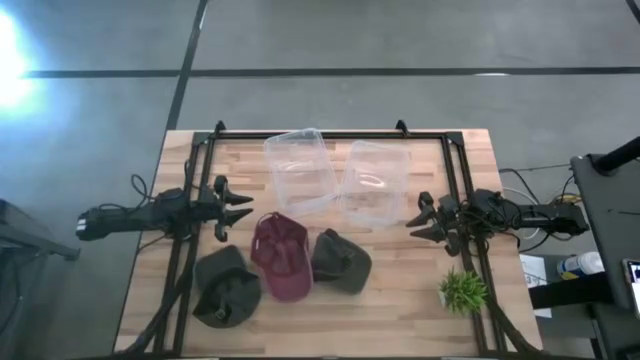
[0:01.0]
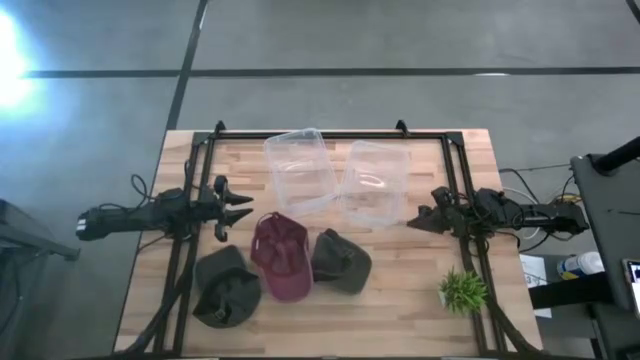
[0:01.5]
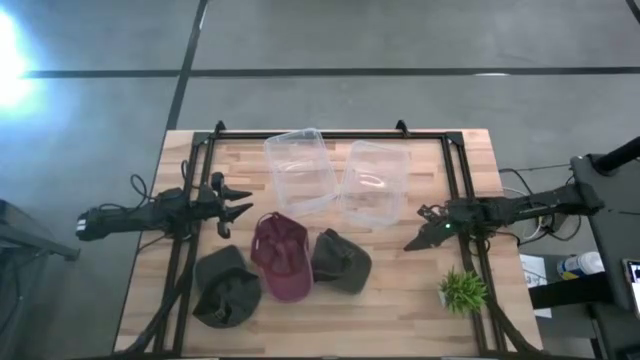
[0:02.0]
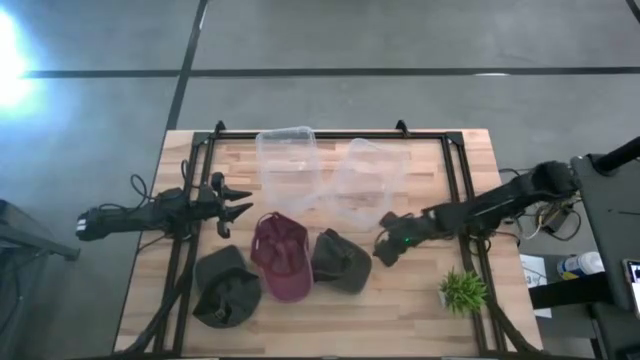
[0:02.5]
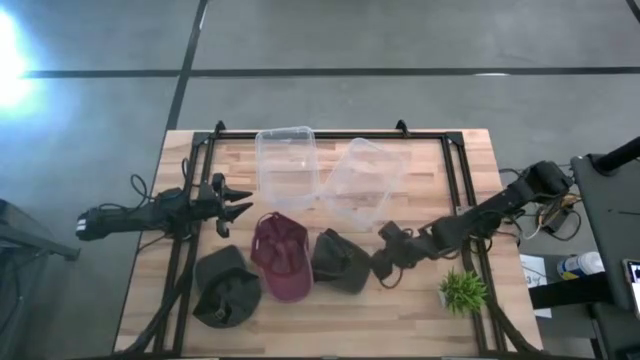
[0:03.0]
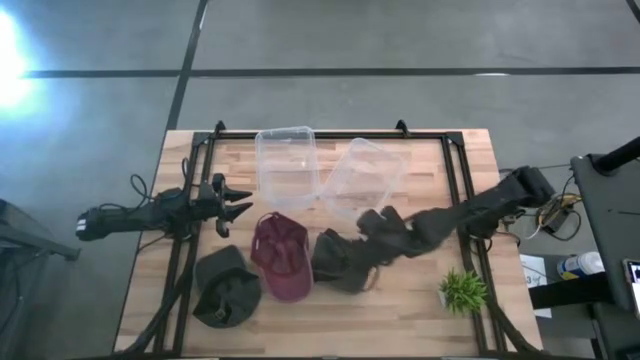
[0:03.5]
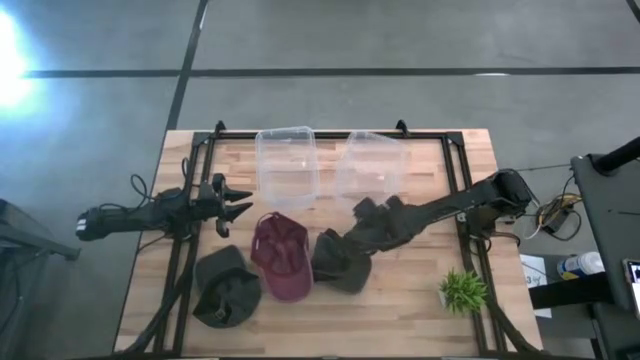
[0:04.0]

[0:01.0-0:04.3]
Task: Pick & Place hat
Adjust the right transparent bin

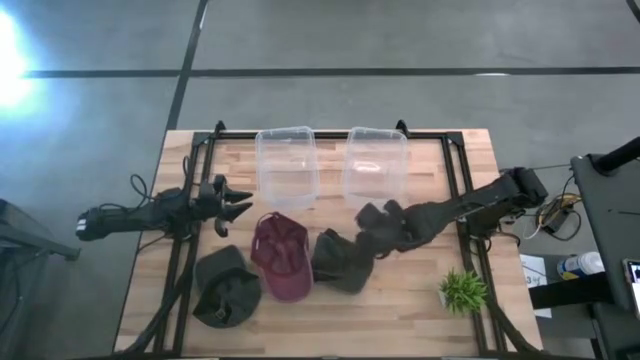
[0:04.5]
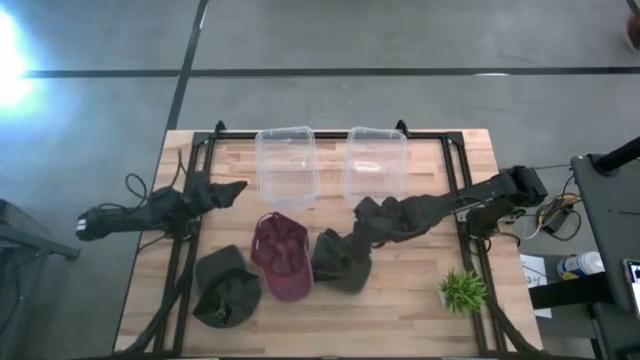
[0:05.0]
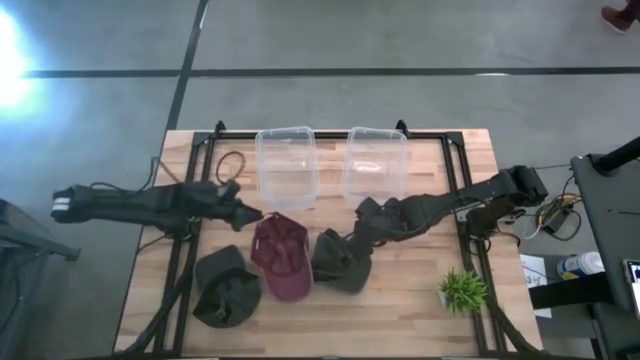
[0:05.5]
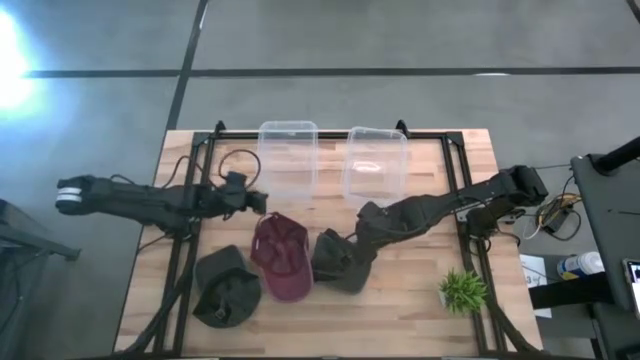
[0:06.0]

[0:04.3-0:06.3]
Adjust the left transparent bin

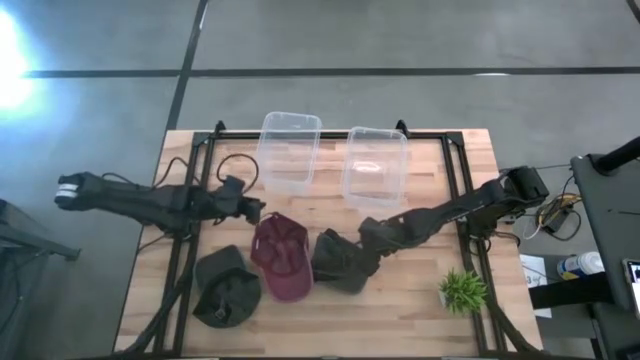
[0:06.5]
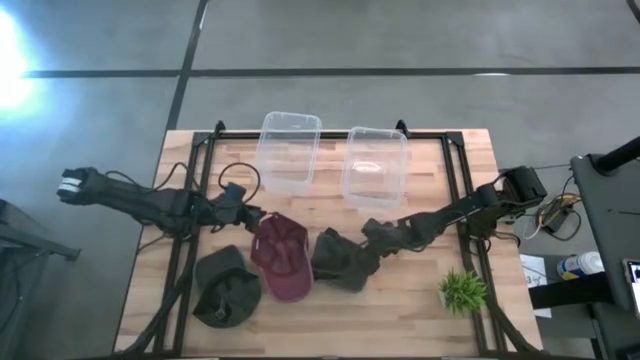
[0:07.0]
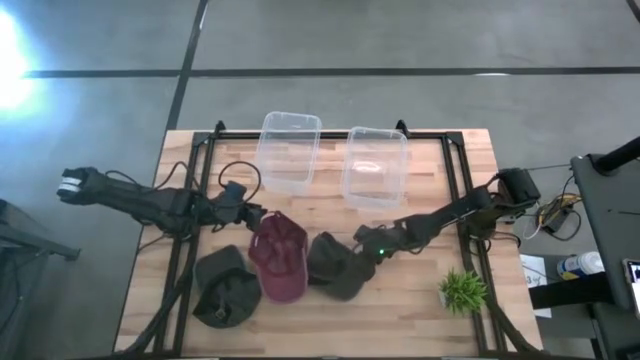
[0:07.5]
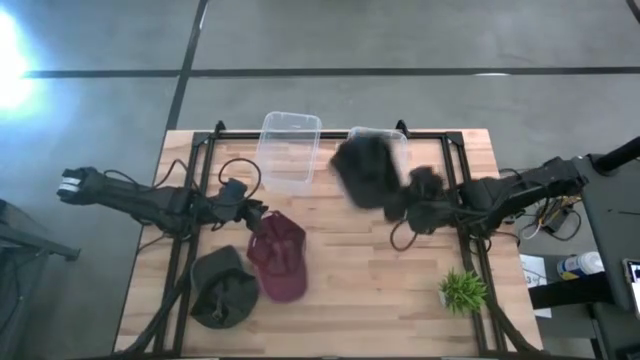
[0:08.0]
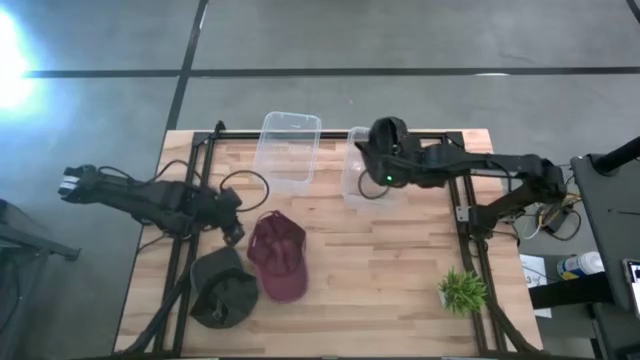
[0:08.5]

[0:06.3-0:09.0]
Put the right gray cap into the right transparent bin

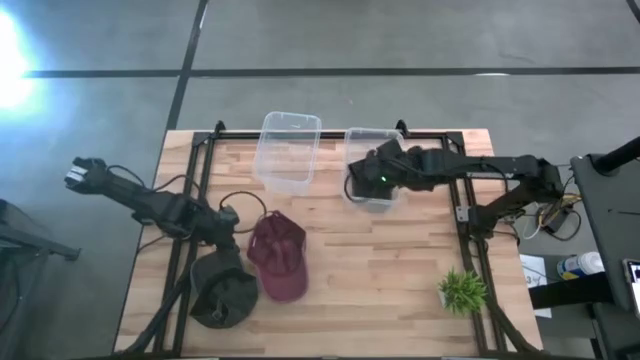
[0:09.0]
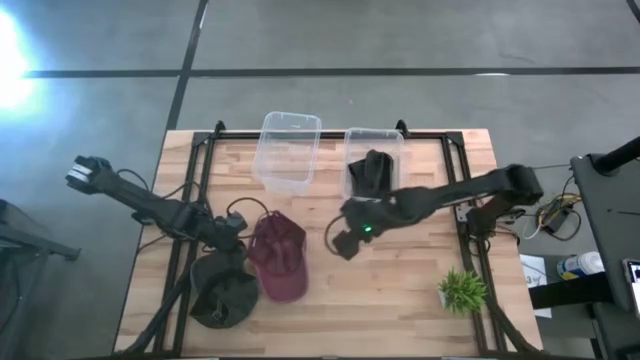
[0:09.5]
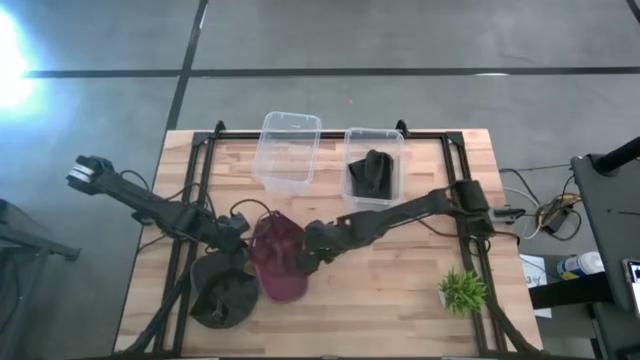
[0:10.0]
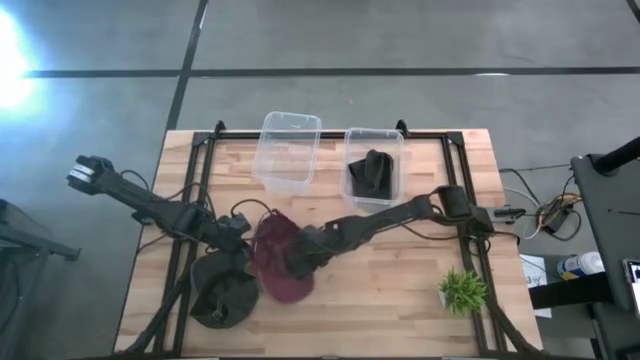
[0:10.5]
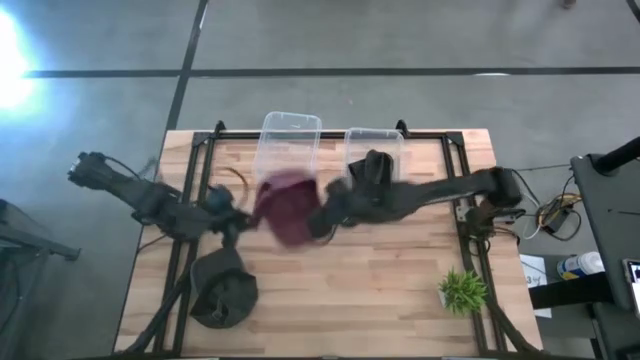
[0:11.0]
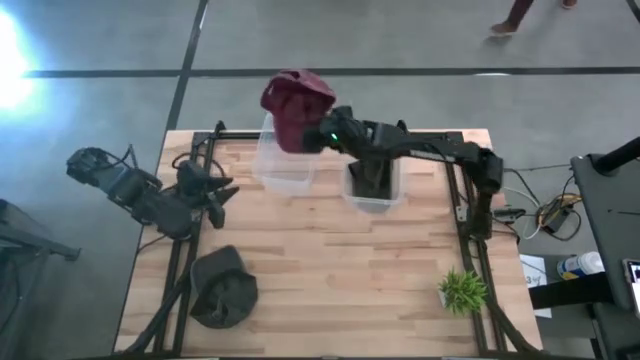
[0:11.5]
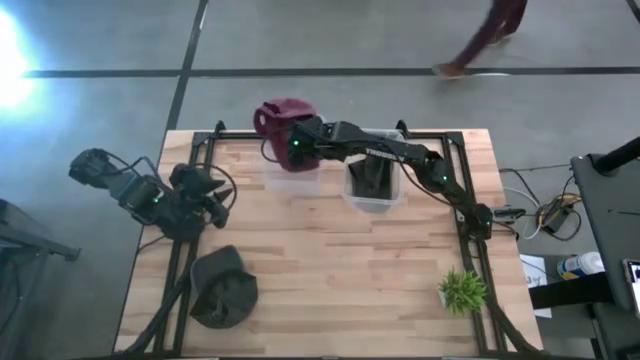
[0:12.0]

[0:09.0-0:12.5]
Put the red cap into the left transparent bin

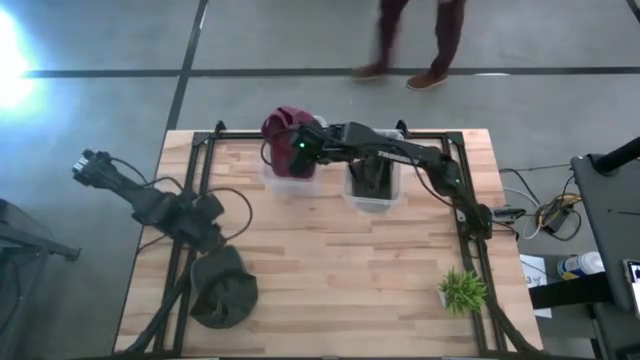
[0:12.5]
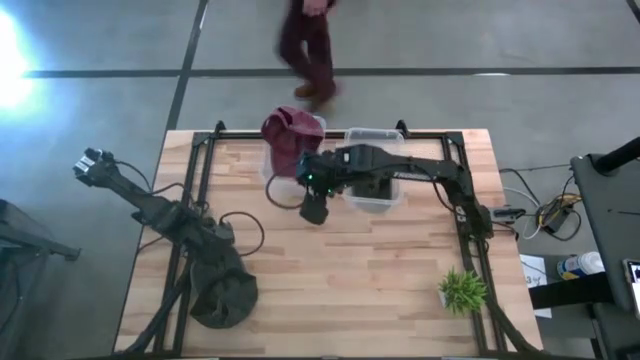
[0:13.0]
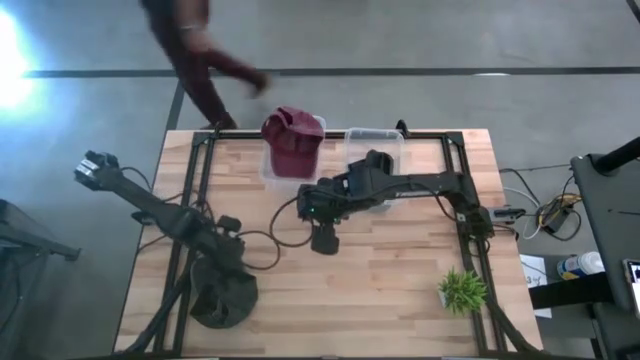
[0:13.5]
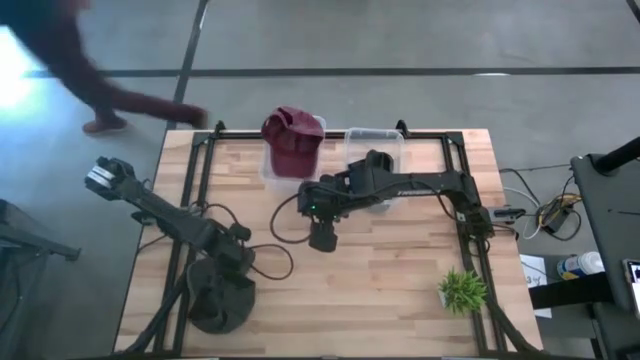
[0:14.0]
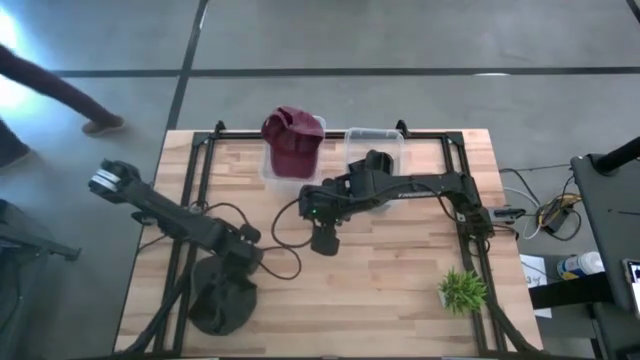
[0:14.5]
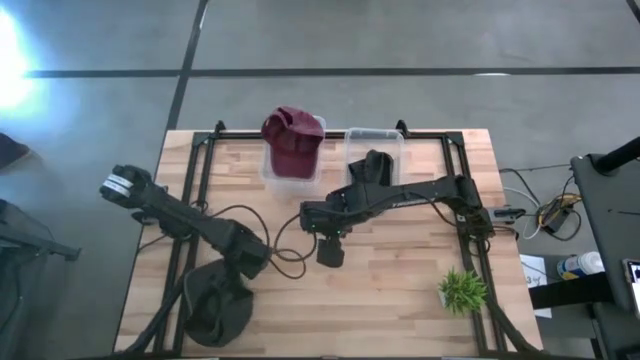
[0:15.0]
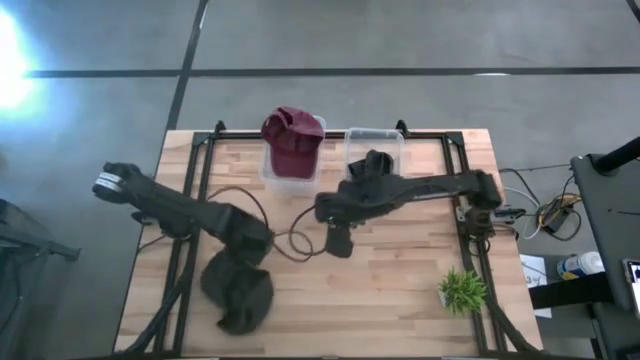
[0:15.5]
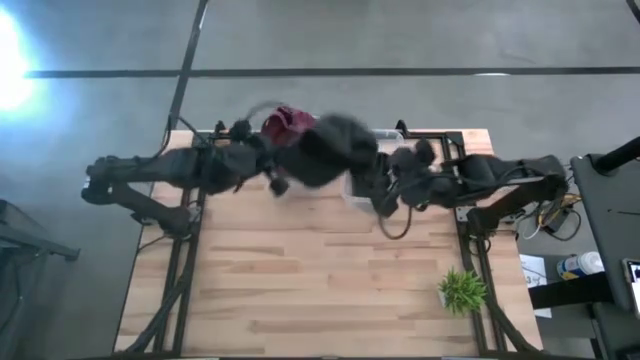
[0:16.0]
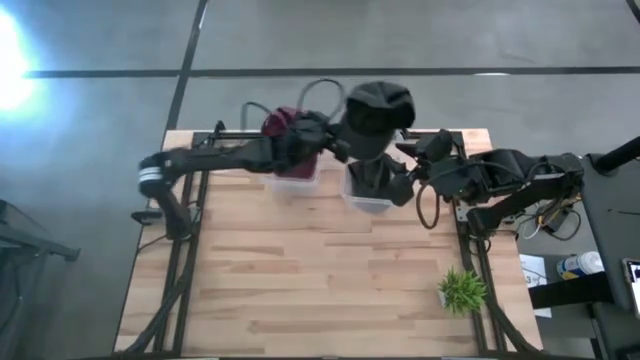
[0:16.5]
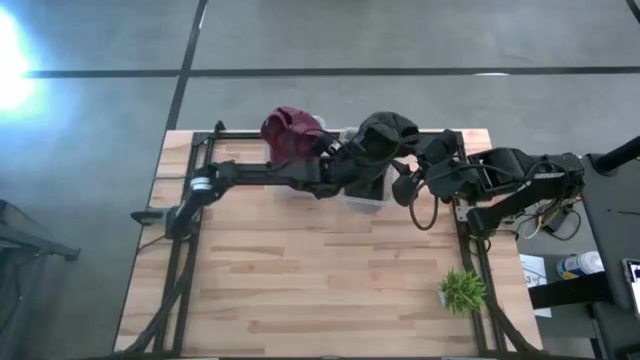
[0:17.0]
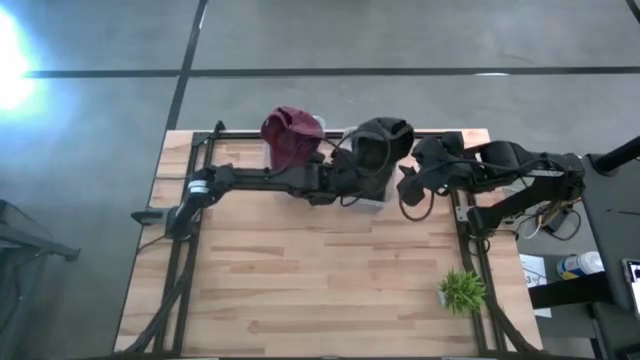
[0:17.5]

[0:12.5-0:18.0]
Put the gray cap into the right transparent bin

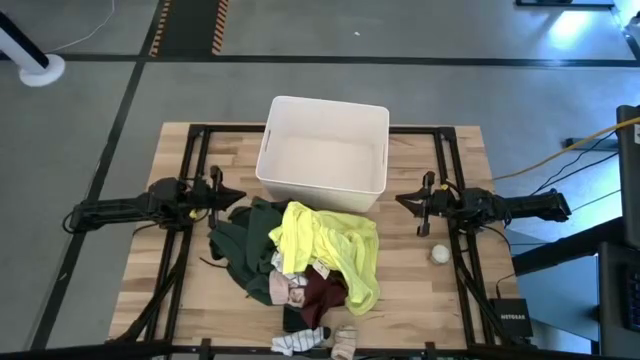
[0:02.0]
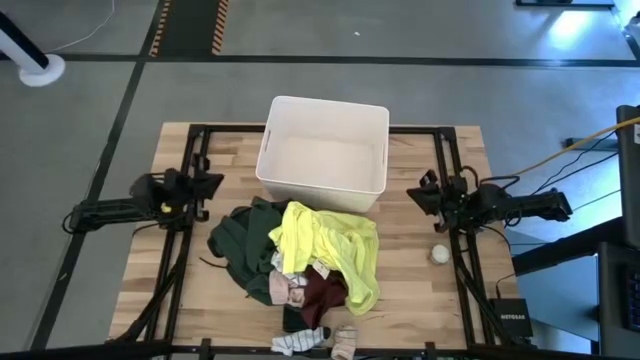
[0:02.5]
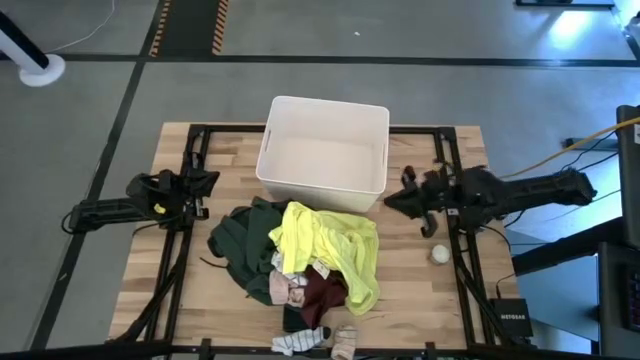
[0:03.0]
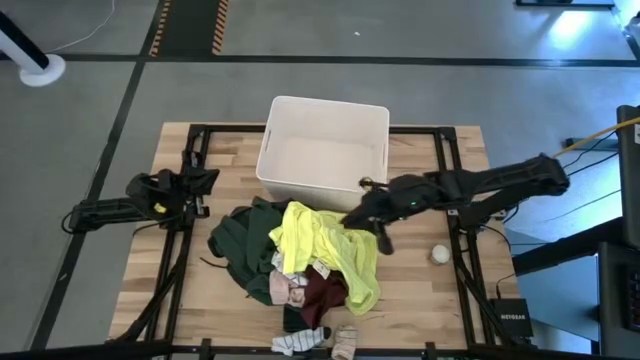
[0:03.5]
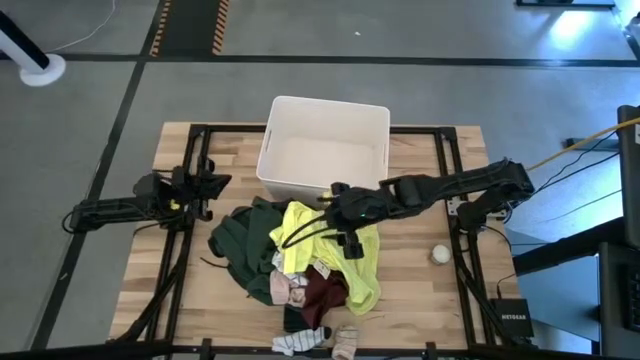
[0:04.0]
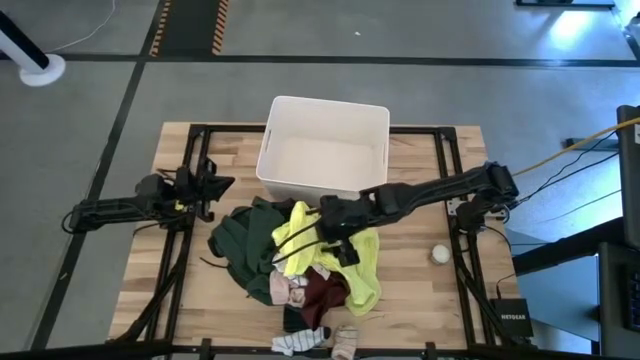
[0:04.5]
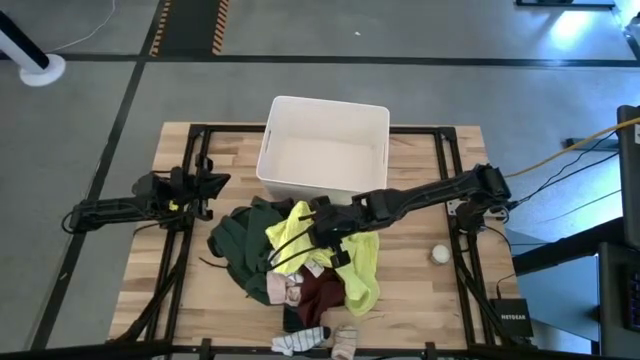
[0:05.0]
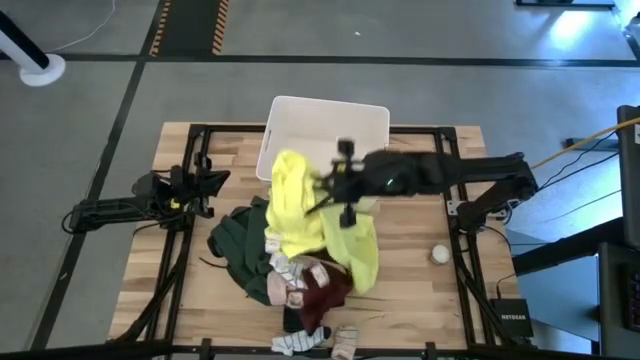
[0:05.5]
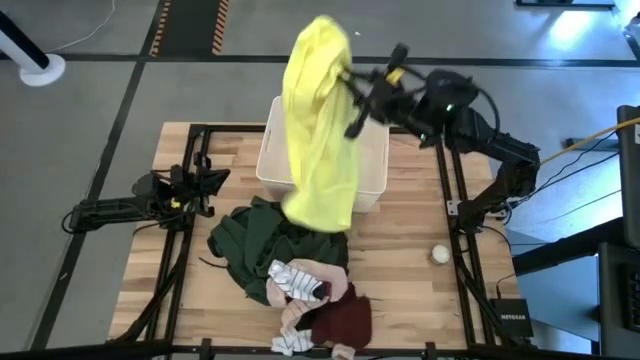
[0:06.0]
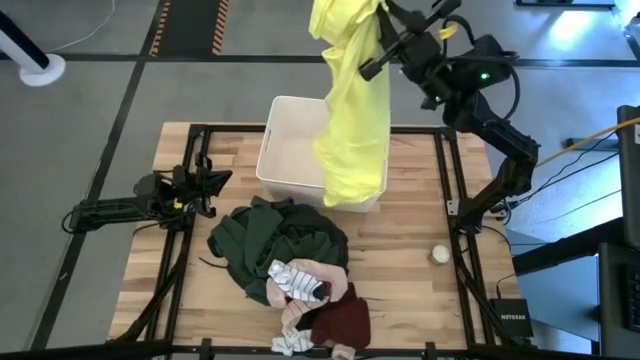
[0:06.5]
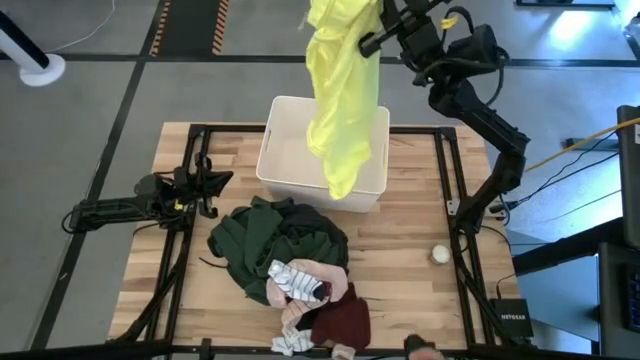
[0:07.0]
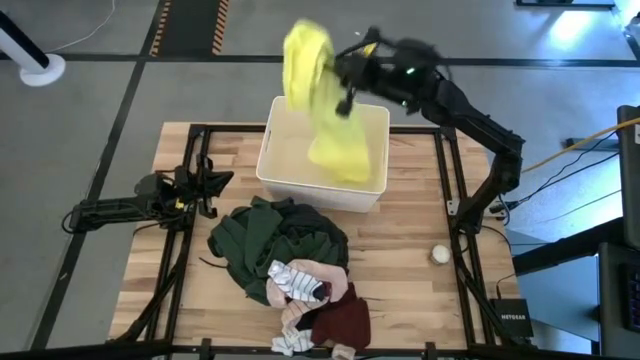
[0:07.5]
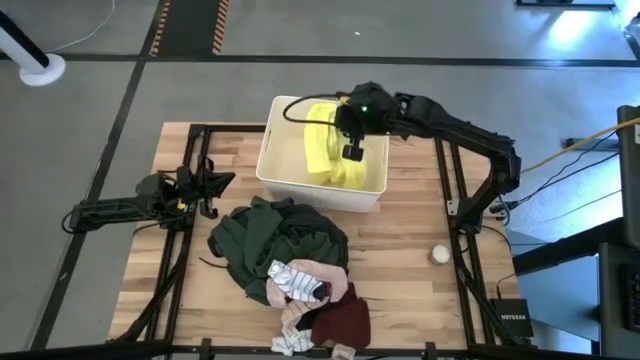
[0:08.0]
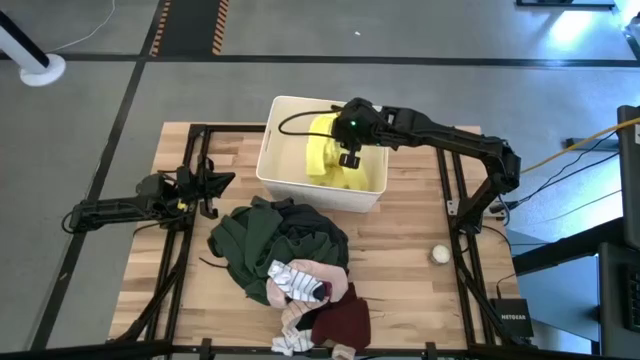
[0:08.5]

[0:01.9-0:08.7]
Task: Sort clothes
Put the yellow shirt into the white bin
